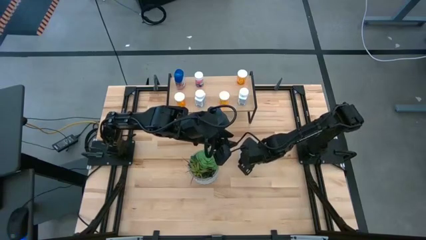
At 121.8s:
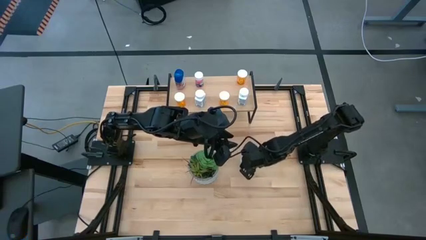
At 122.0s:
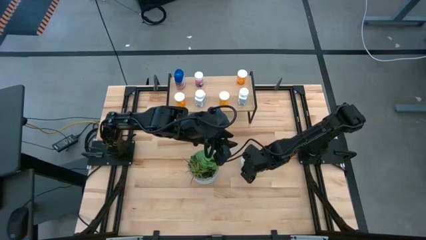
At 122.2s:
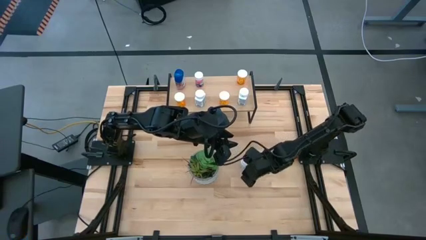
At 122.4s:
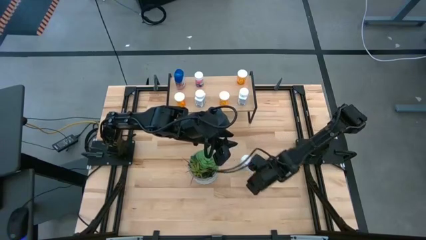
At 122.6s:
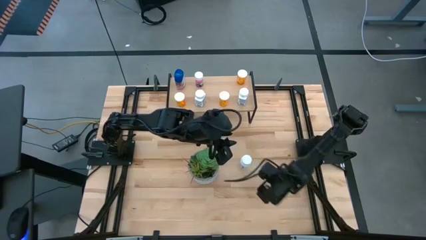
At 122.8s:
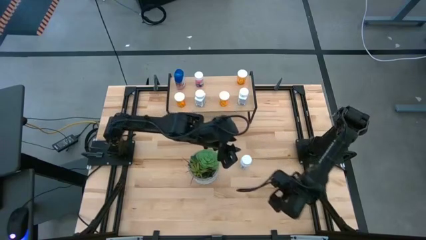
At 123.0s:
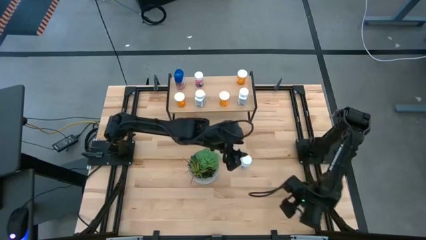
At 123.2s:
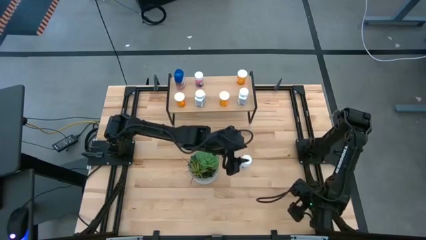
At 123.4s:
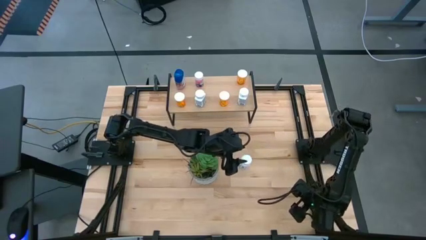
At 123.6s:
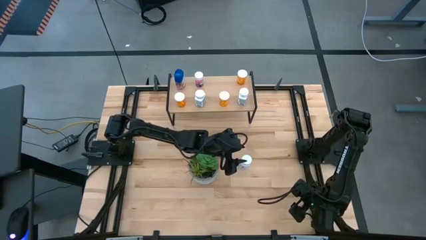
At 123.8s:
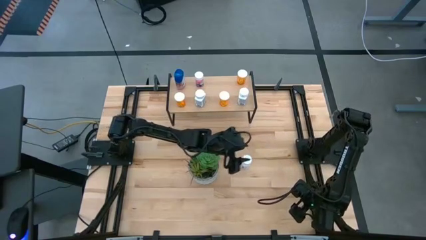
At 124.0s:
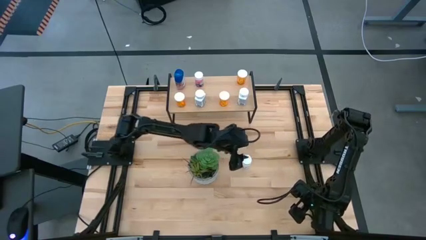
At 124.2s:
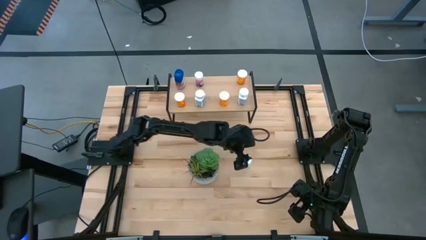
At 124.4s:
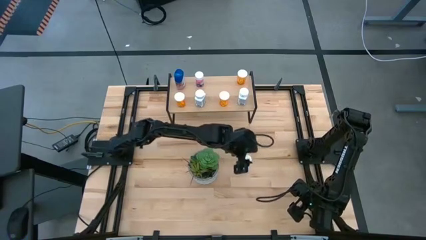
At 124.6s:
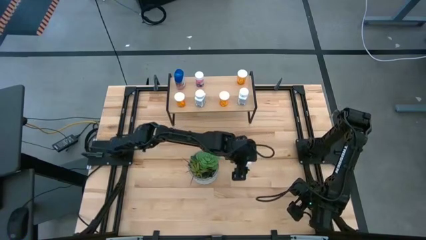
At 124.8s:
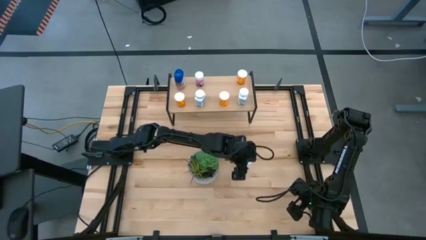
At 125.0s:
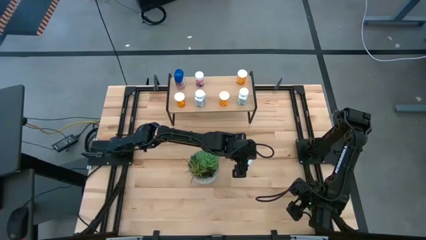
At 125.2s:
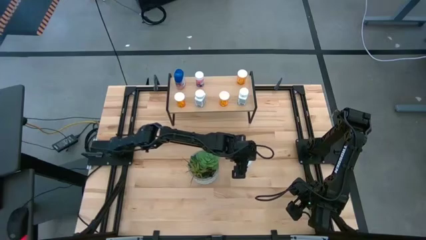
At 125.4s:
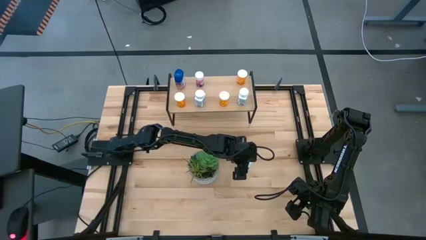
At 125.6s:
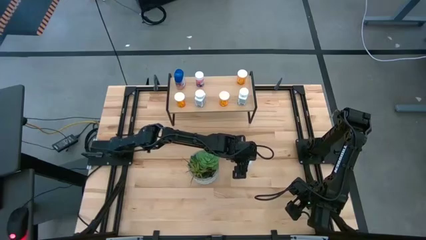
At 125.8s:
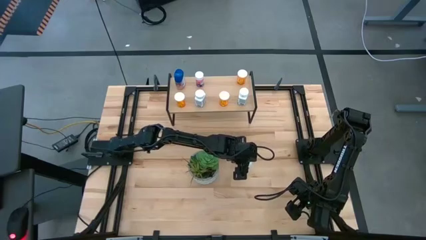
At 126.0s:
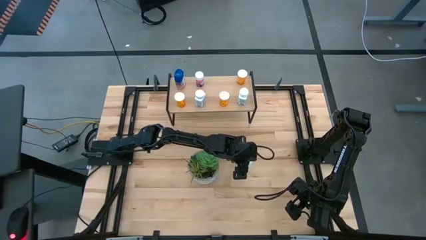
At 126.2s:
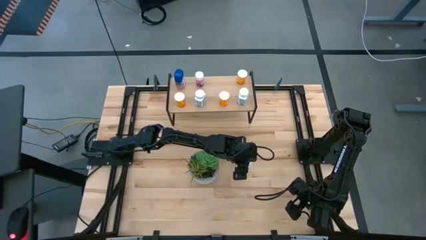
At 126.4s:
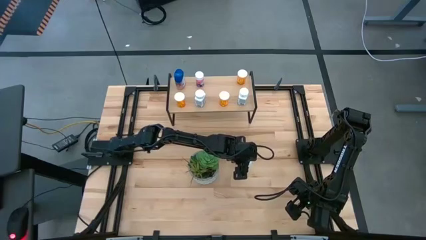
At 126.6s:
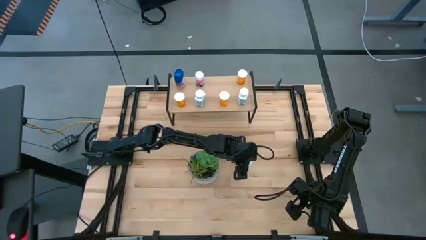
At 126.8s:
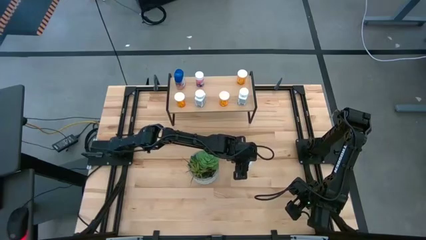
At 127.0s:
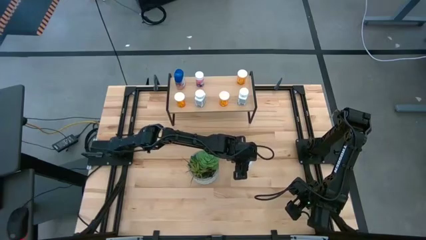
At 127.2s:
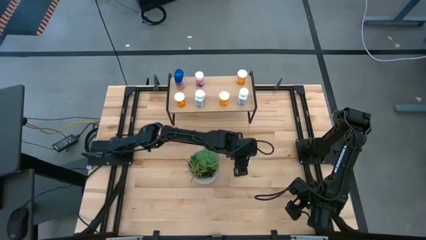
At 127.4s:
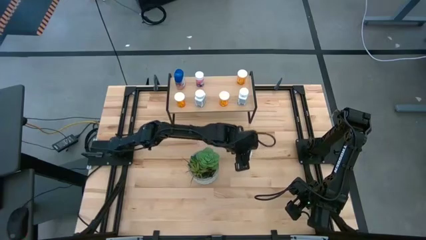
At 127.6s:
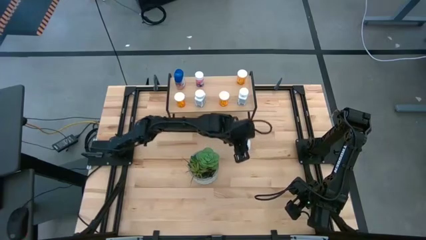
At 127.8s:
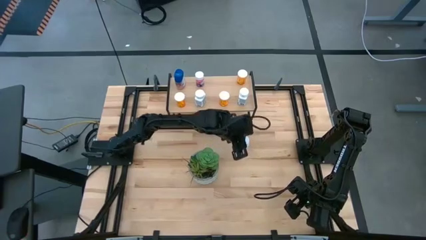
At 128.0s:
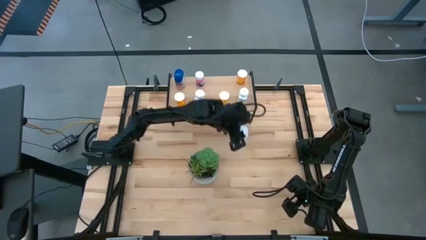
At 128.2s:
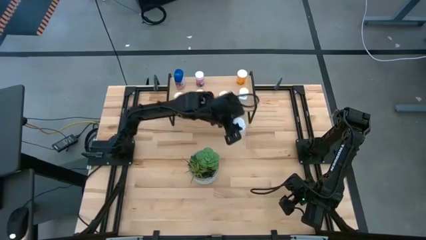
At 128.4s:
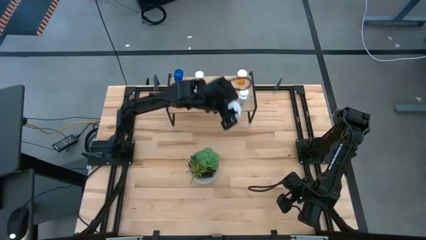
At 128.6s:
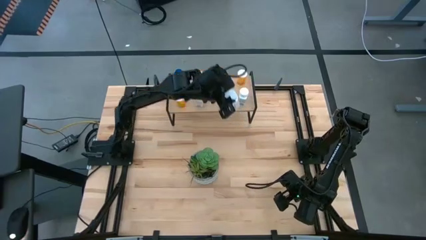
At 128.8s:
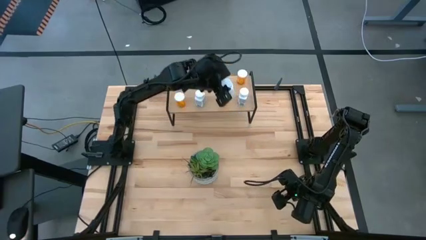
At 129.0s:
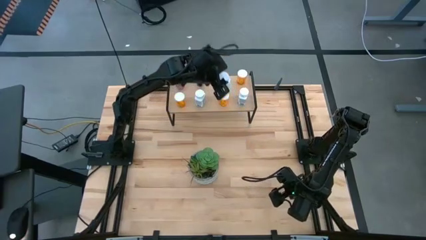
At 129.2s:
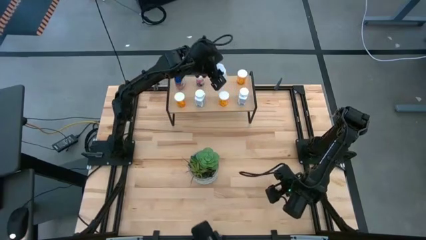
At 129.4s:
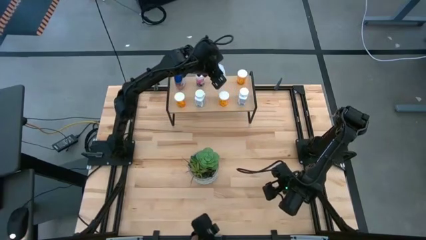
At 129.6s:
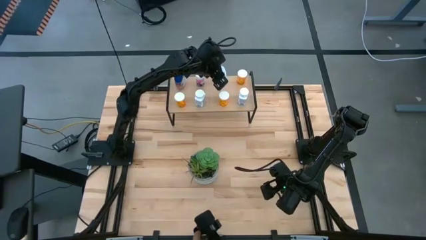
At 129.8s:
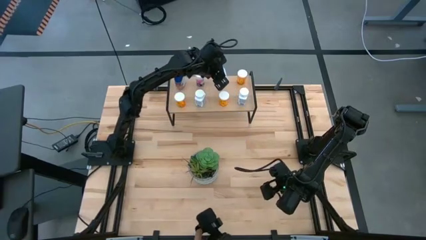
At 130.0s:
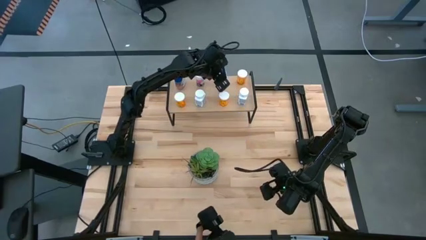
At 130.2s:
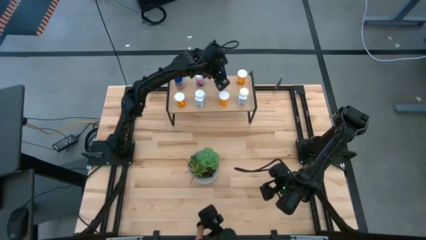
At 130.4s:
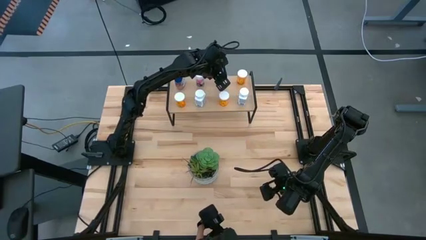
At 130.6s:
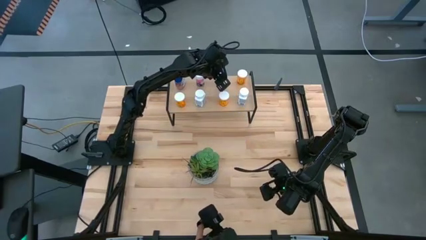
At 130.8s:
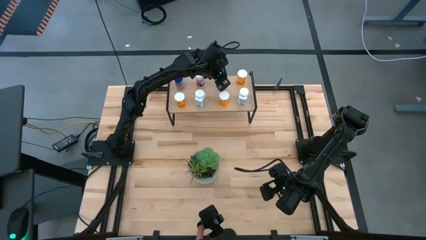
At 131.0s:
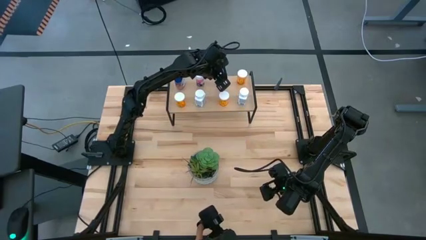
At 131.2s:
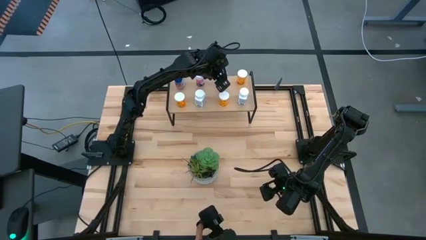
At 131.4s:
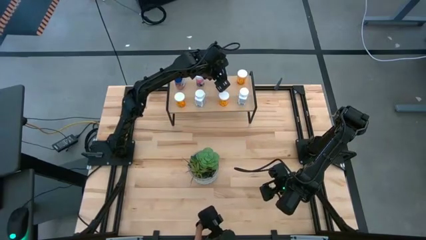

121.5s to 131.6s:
Task: Pick and place medicine bottles onto shelf by color
Put the white pill bottle on the shelf
